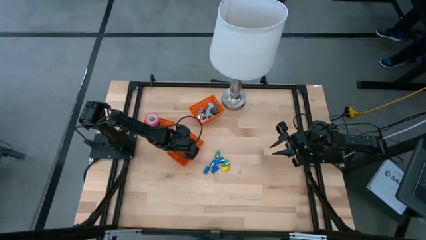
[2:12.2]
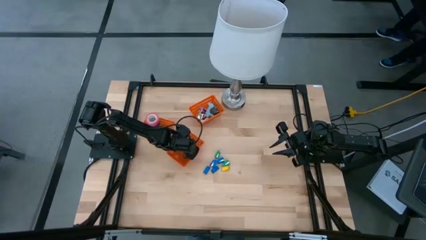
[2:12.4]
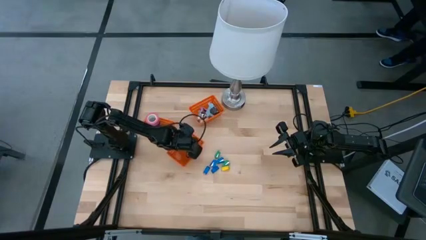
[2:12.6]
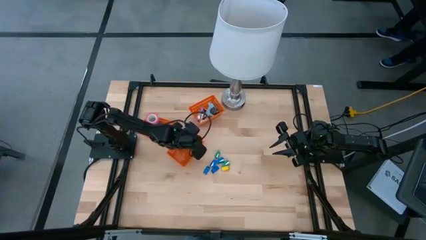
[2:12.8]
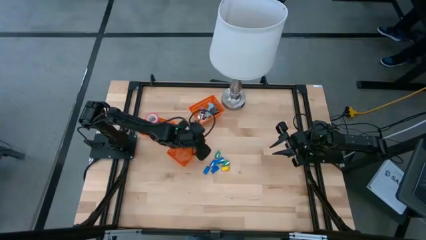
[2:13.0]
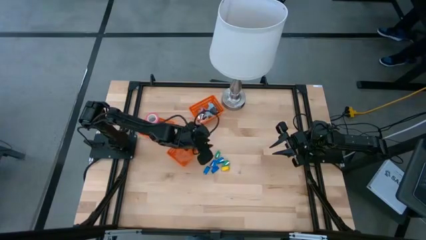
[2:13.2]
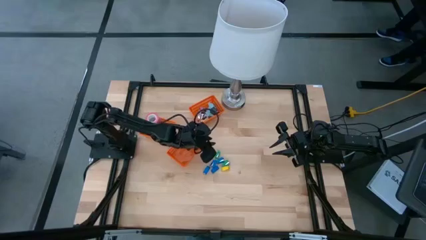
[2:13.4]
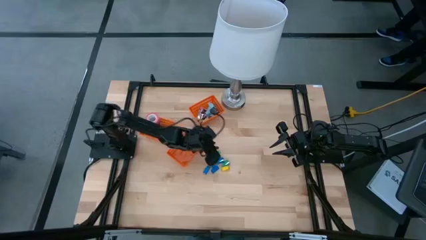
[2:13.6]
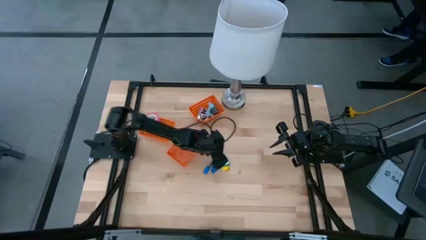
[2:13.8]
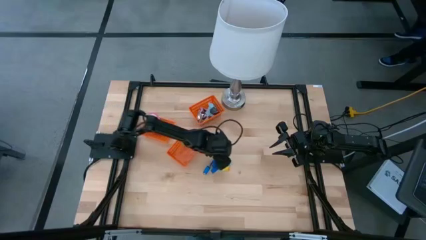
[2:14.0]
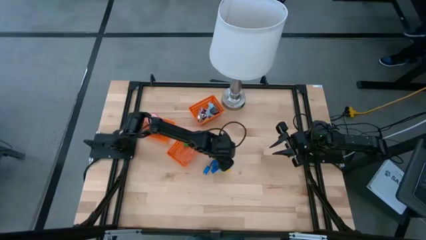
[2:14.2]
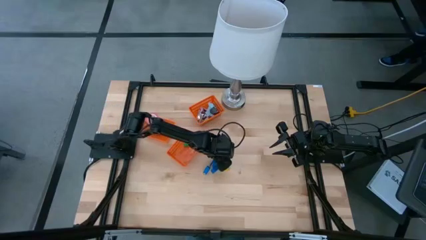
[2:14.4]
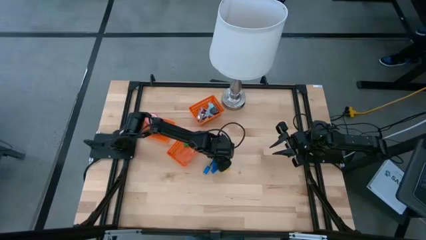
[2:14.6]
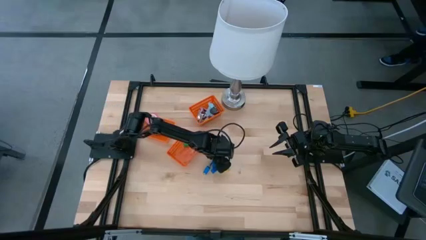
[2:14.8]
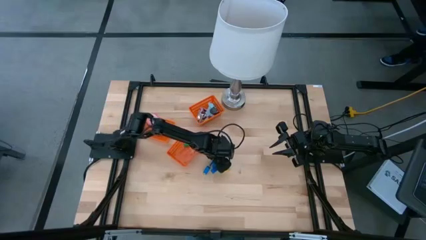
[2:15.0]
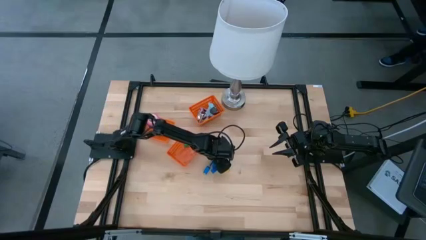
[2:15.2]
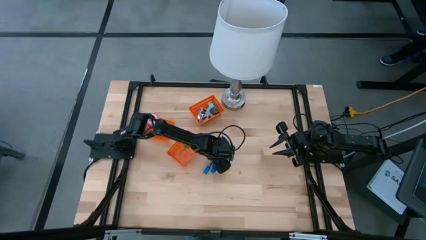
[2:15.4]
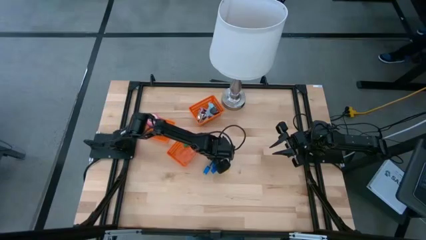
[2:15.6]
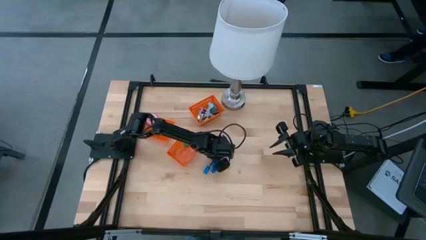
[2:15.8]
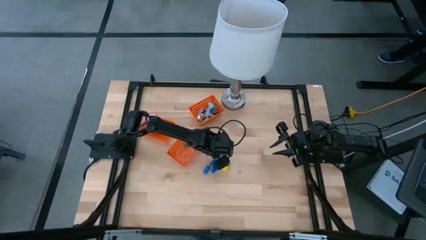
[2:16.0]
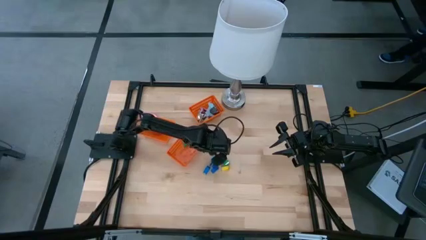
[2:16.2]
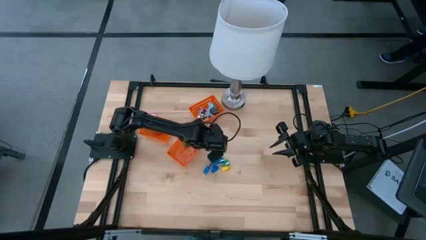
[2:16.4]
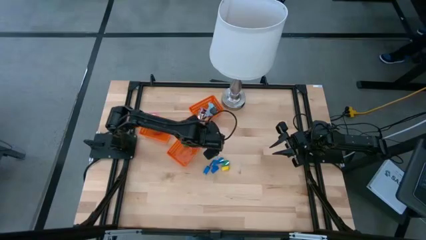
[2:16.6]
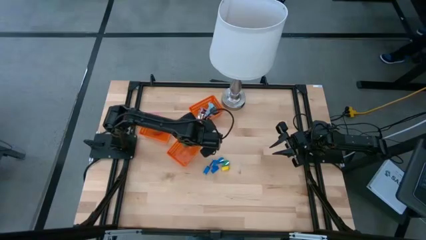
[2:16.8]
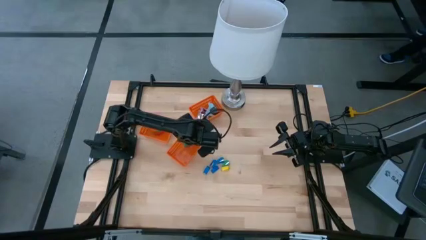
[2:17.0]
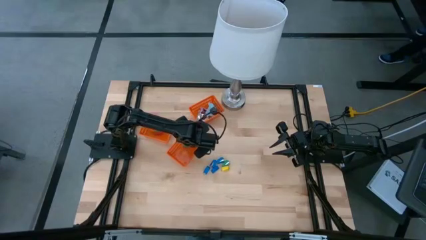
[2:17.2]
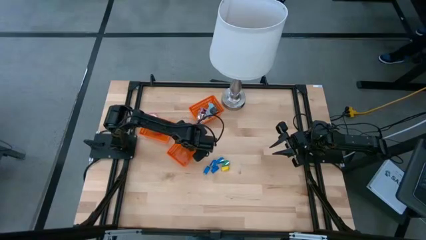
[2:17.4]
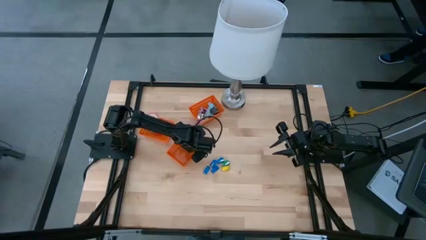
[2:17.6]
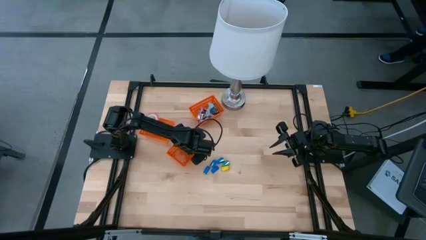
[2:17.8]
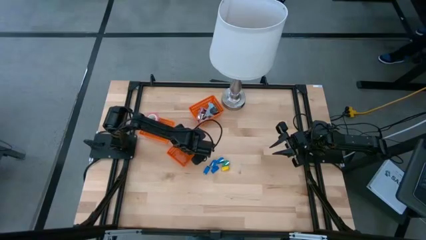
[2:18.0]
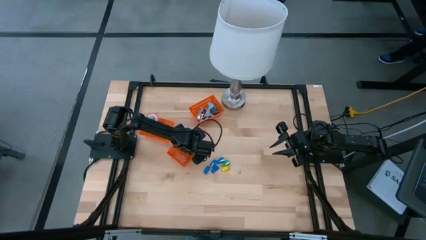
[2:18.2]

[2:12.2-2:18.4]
Task: Pick and place Stapler, Stapler remover, tape
Put the green stapler into the bottom orange bin

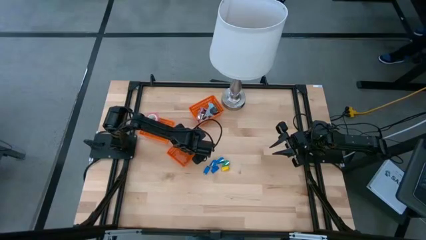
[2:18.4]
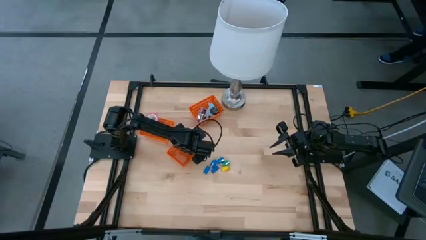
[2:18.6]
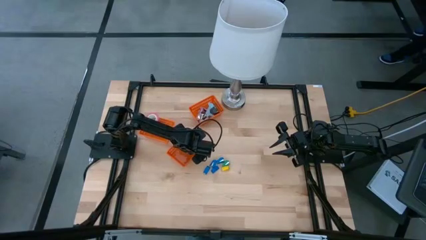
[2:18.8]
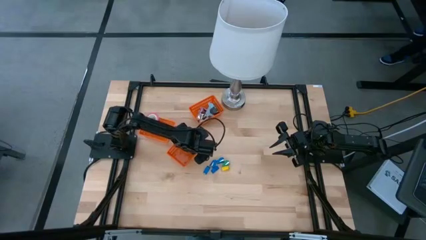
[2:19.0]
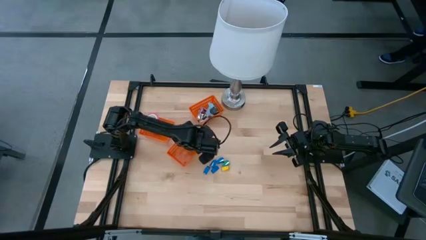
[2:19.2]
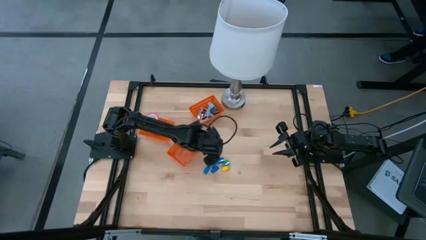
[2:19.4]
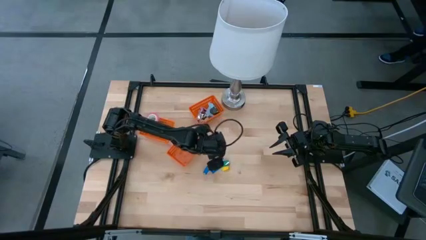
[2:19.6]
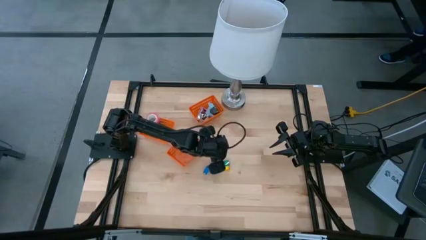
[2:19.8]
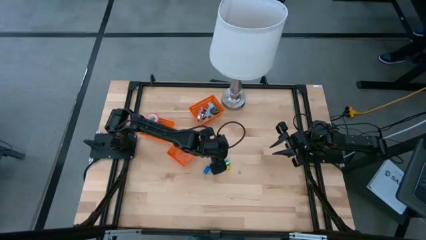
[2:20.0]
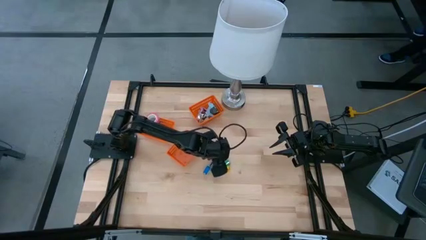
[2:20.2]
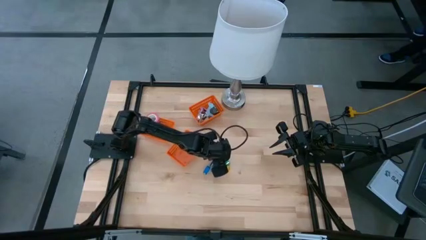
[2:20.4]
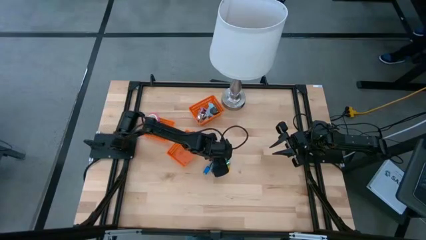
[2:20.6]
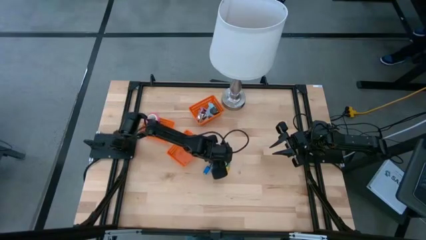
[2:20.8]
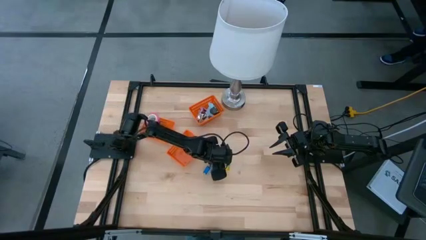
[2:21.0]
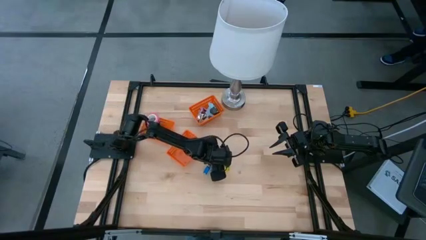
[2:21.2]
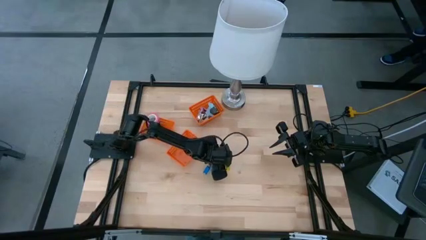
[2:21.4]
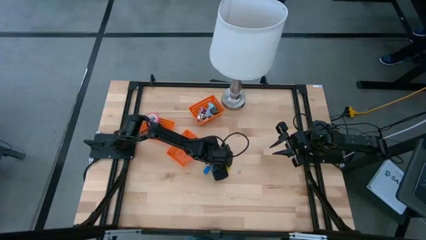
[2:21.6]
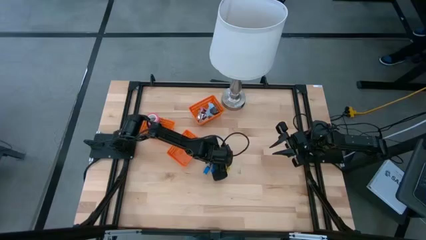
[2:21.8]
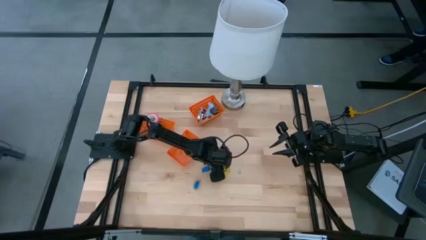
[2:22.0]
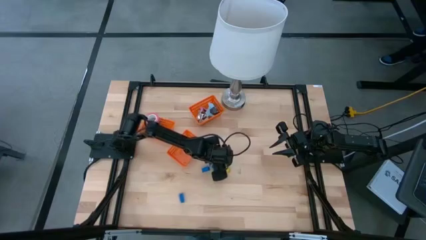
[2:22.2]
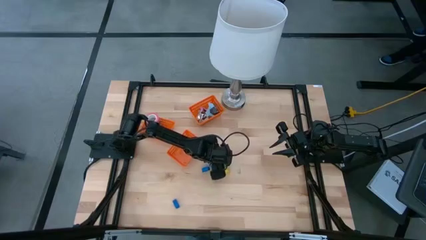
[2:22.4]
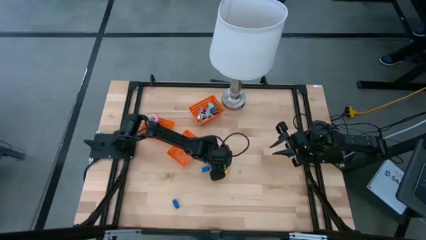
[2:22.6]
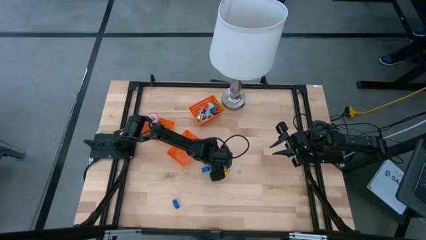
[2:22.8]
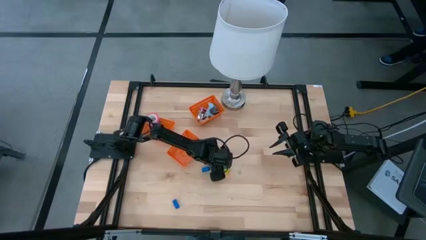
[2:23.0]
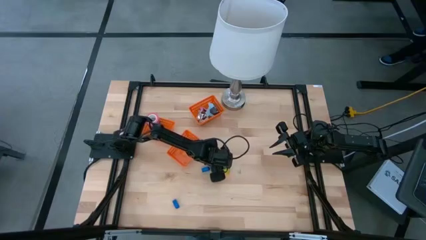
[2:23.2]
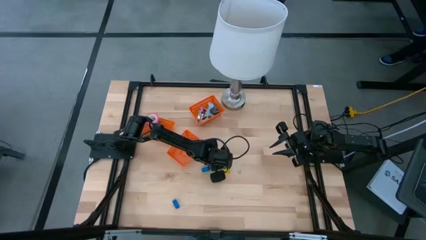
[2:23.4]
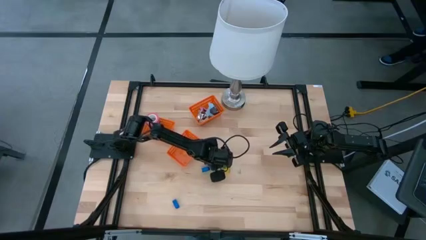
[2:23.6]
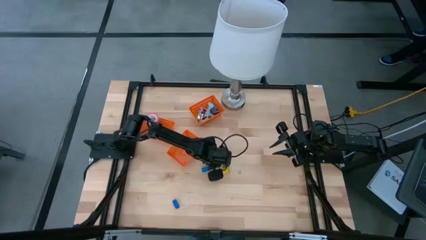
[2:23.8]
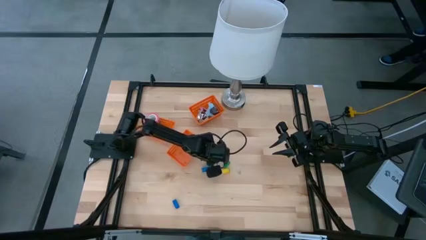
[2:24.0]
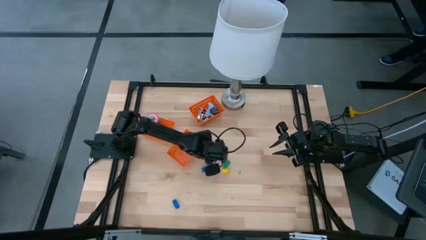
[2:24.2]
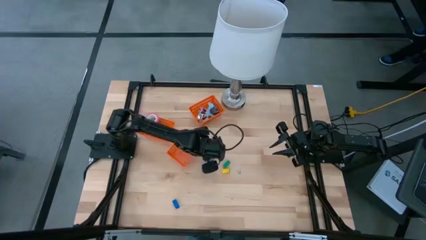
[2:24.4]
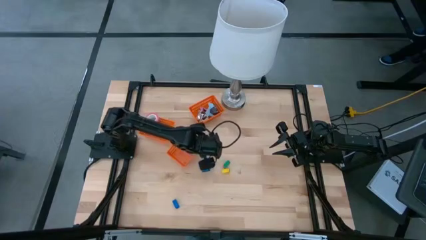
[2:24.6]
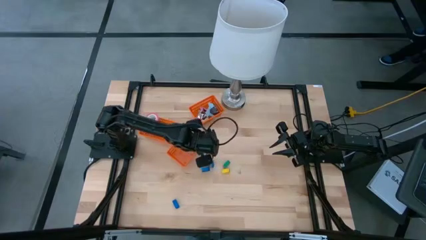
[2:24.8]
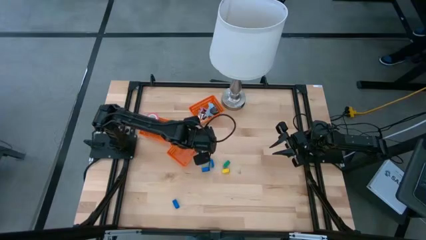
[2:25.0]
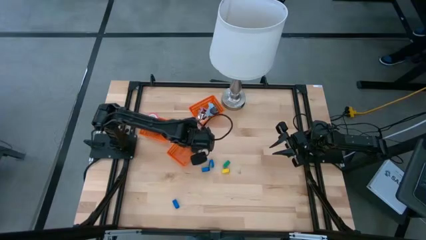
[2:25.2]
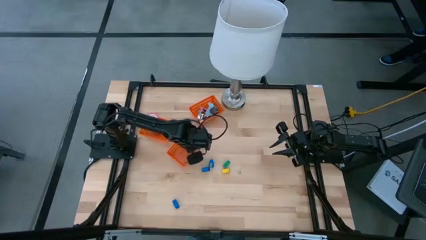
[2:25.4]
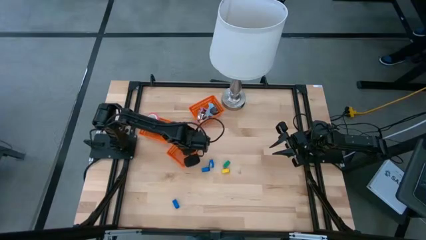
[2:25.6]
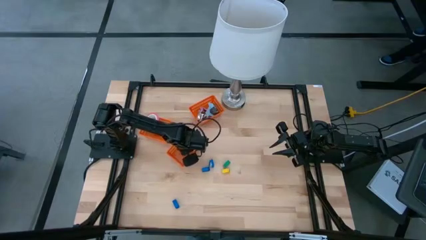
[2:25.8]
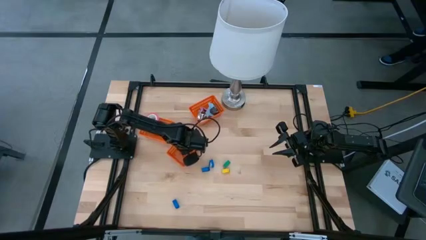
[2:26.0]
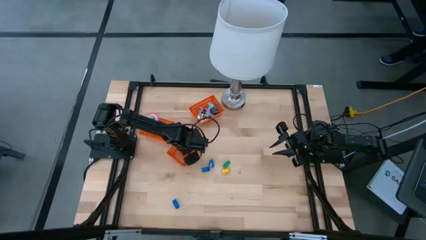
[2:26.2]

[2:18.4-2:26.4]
Put the blue stapler into the bottom orange bin

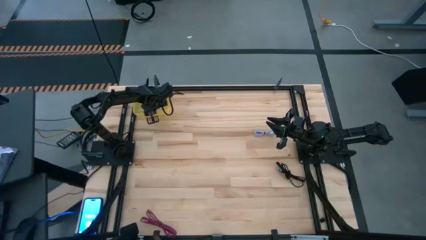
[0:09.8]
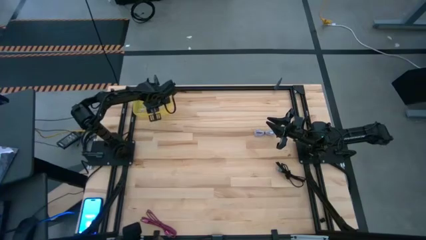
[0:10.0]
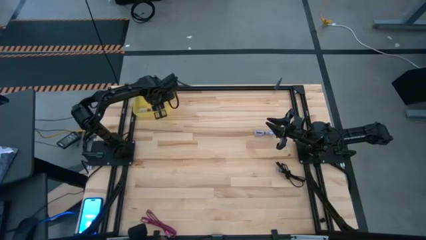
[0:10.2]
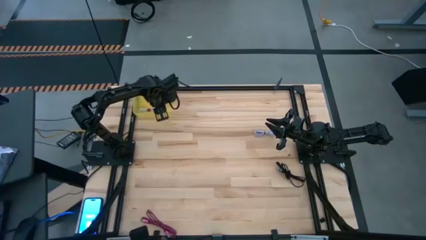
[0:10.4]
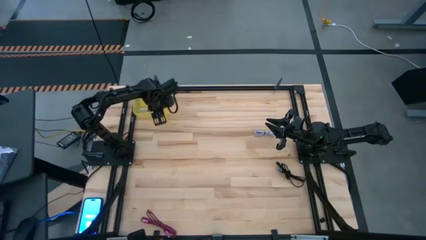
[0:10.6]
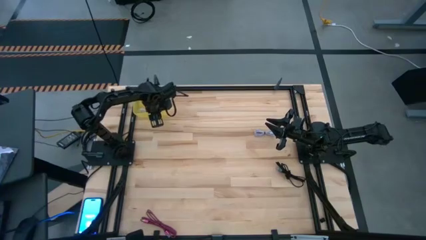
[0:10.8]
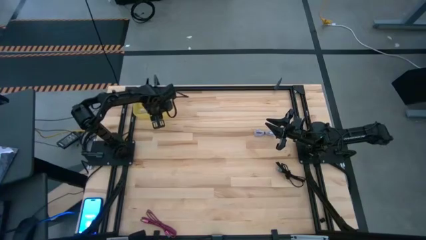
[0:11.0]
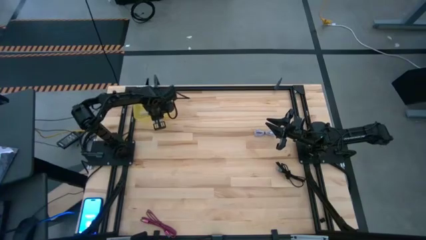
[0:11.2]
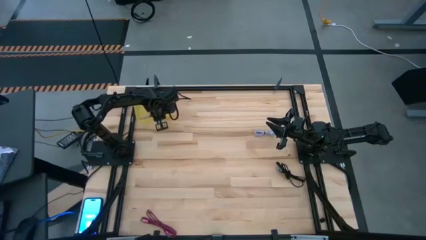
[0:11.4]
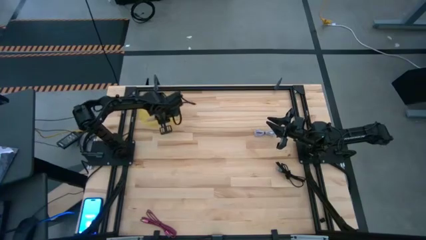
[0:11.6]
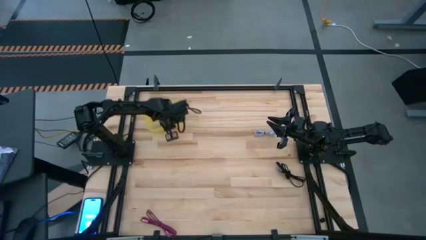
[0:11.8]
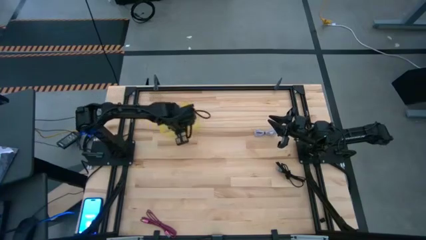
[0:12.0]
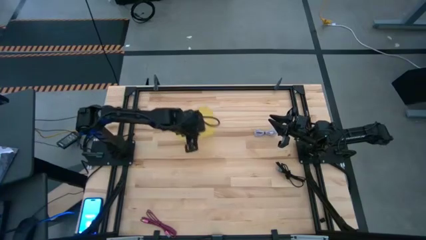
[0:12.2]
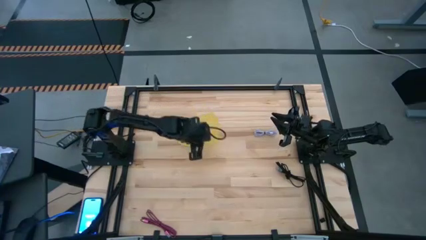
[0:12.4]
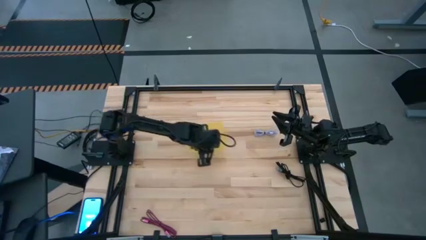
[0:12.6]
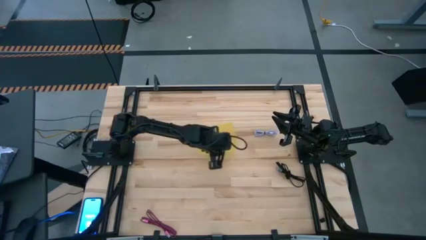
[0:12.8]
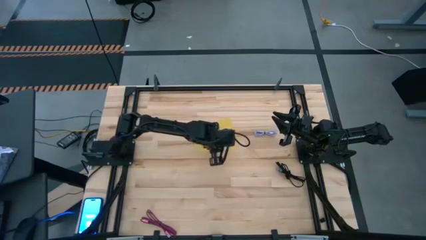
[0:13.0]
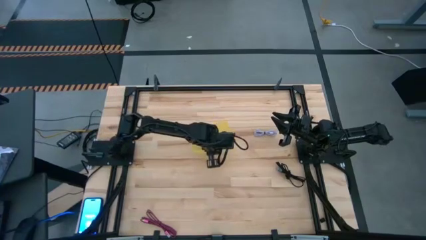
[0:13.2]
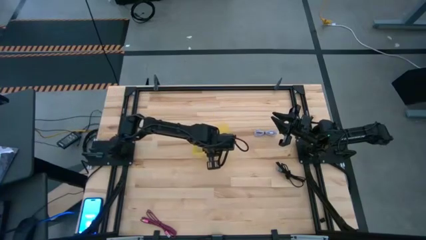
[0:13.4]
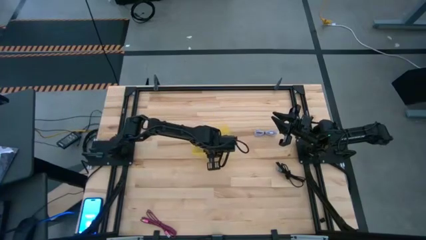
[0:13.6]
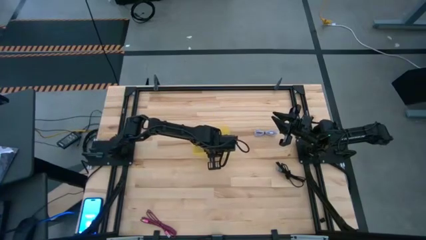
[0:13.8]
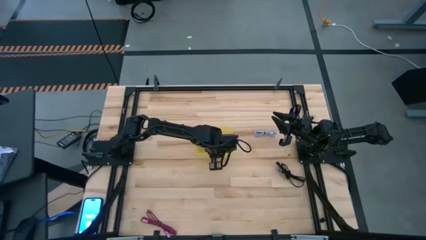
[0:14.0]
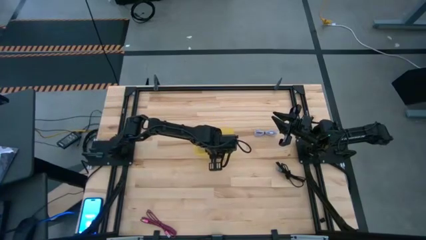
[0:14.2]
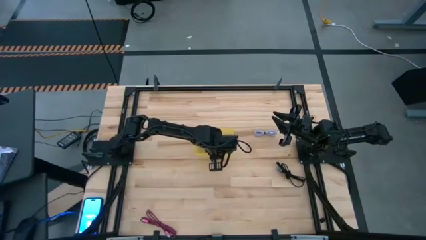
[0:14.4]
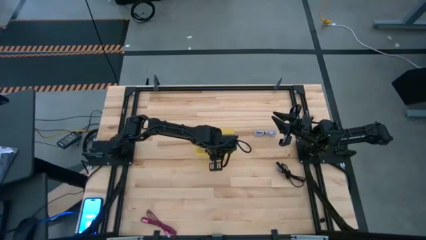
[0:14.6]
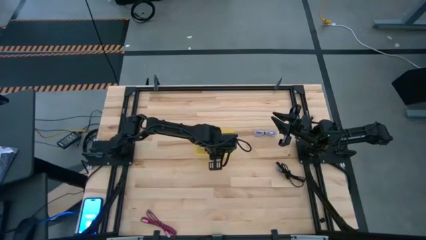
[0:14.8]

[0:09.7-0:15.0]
Task: Pick and place USB-C Cables
Move the yellow transparent bin to the center of the table
